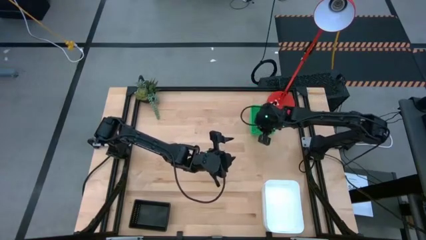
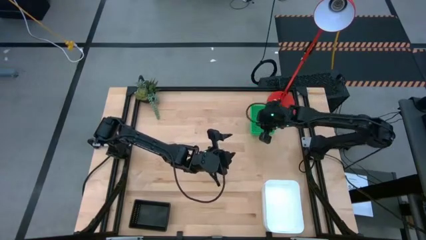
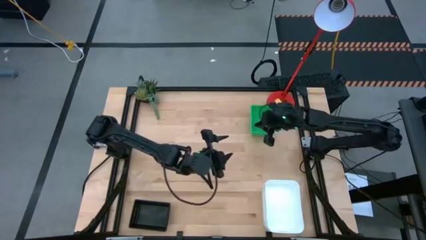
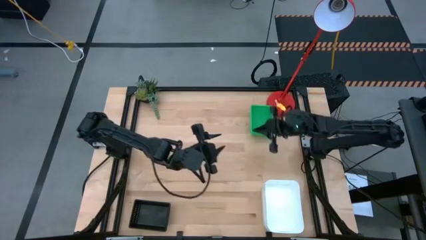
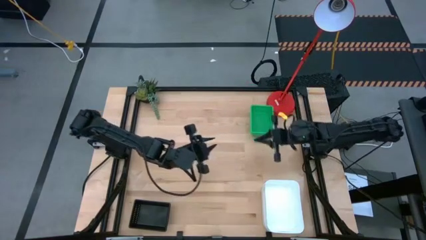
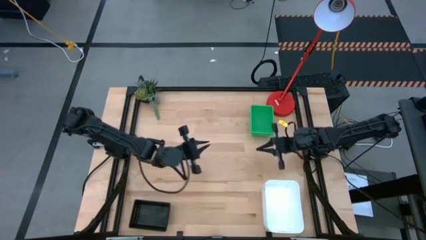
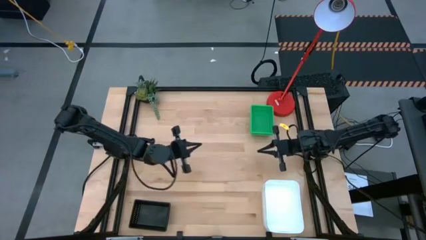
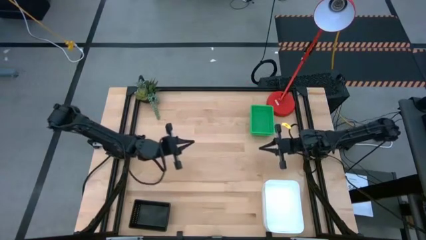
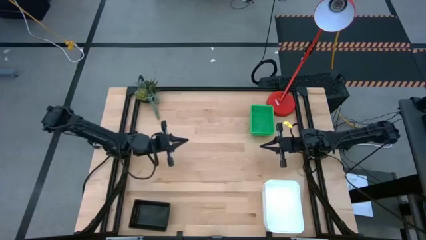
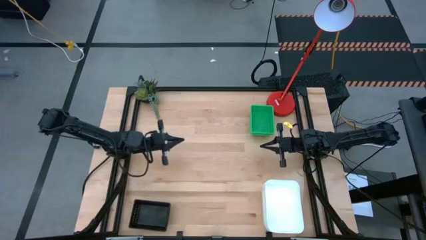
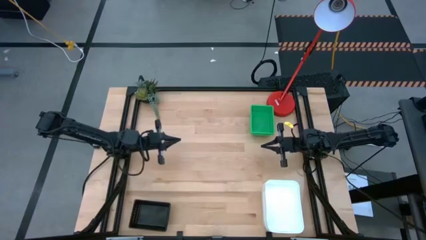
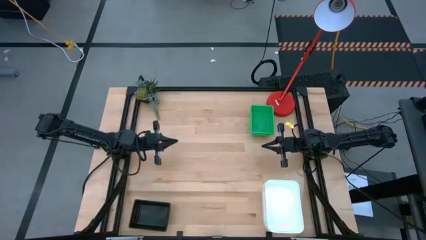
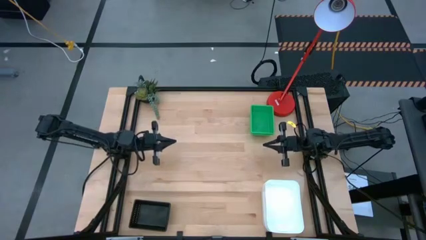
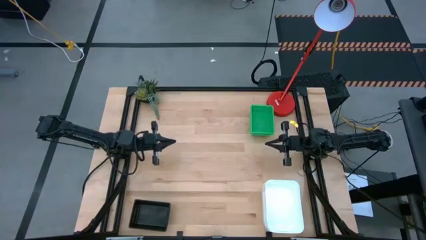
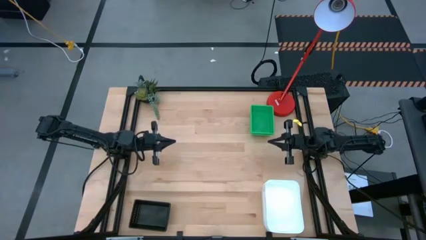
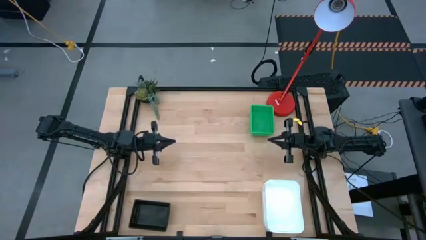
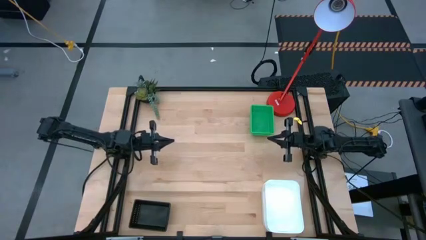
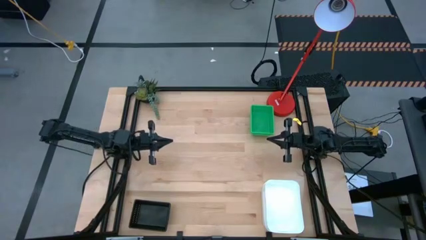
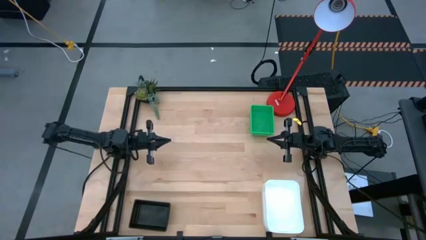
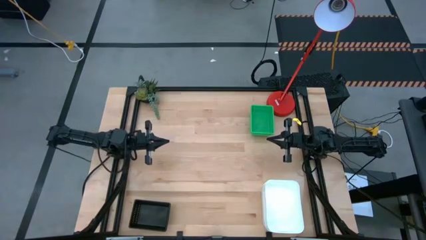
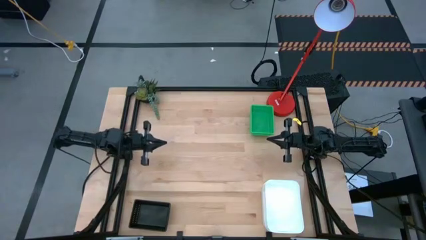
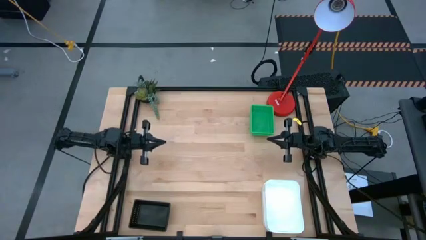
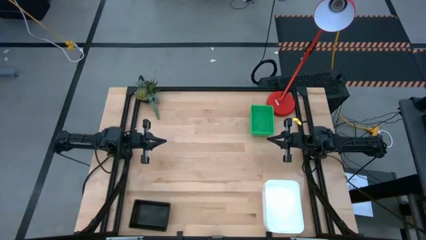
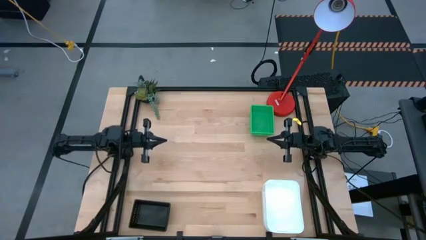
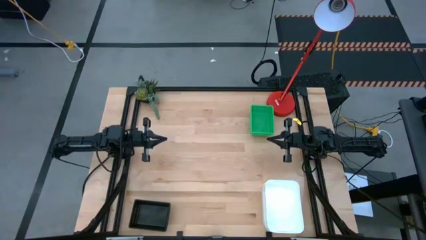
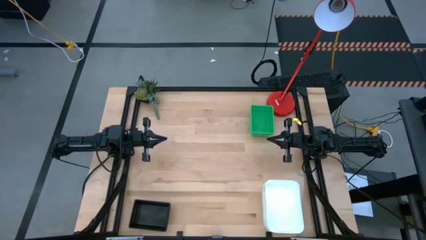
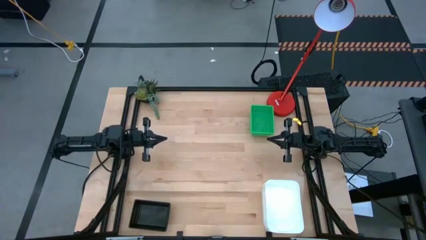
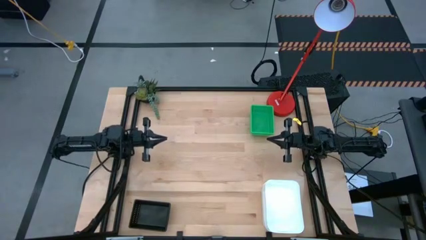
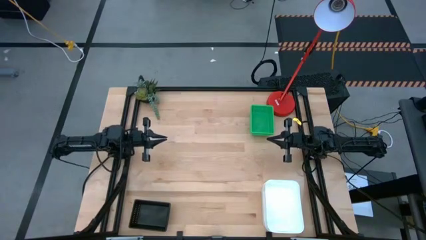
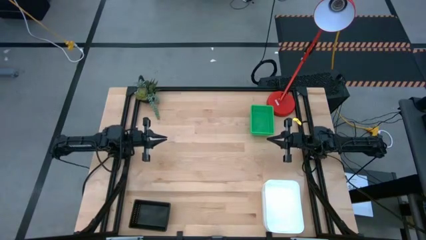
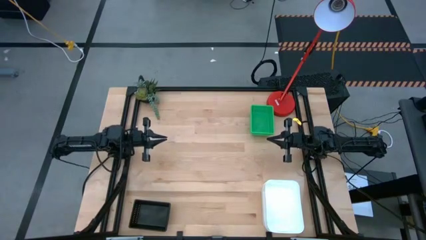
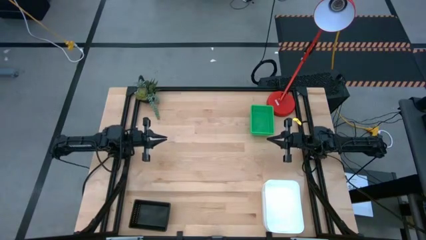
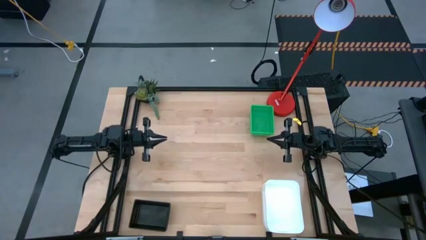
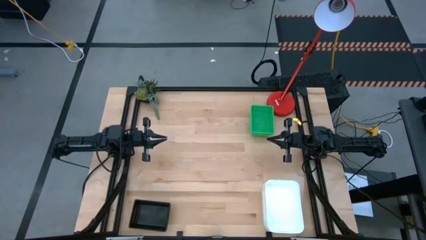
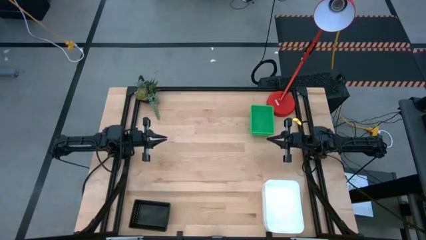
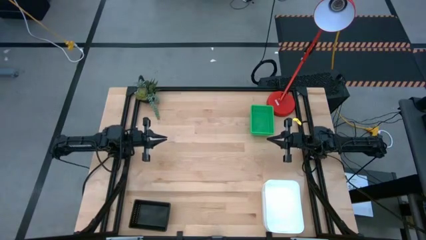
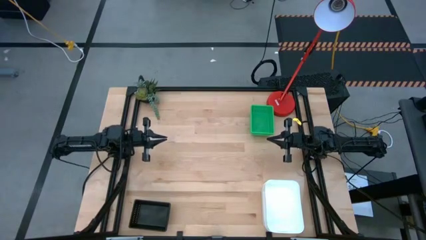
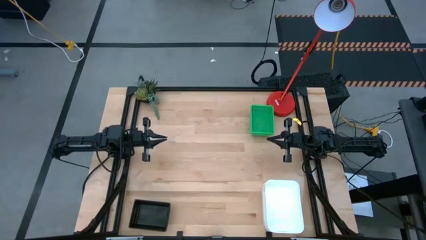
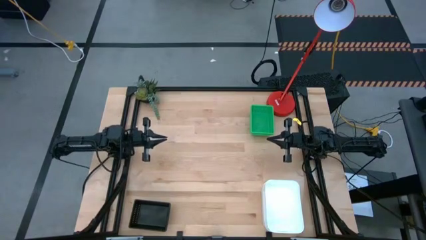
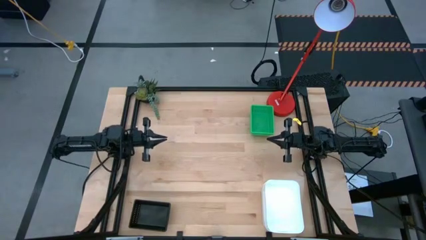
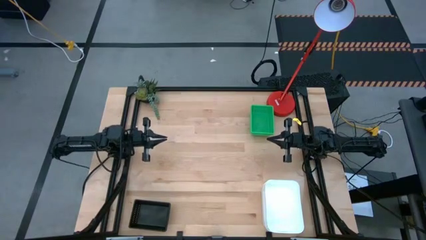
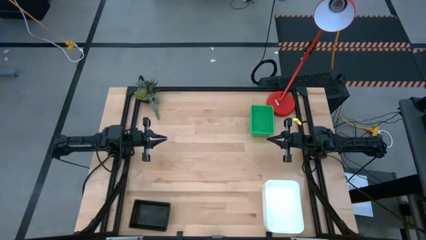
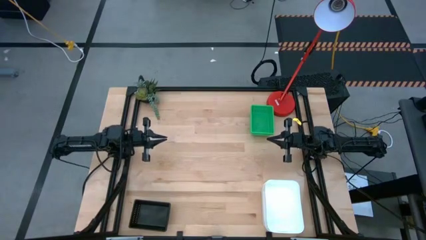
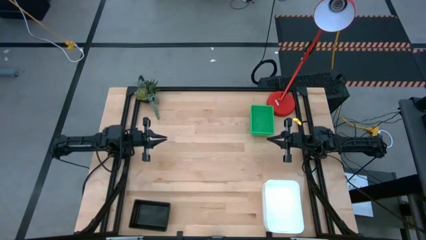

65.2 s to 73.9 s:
Return to Home Position
